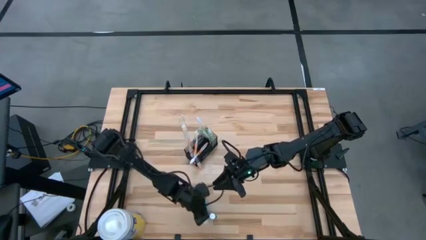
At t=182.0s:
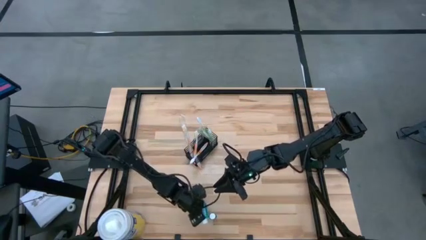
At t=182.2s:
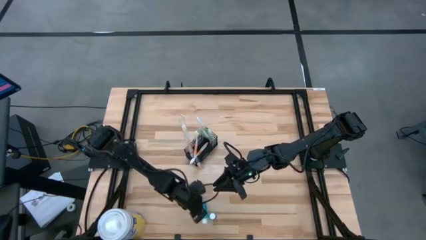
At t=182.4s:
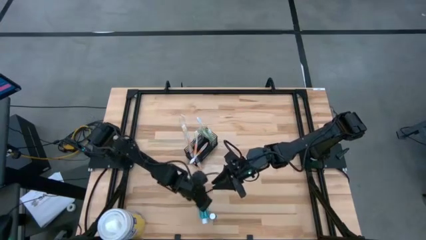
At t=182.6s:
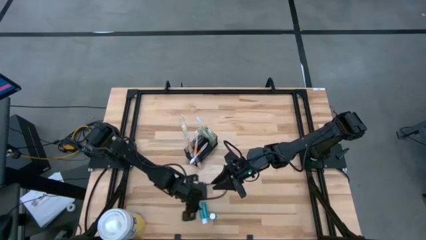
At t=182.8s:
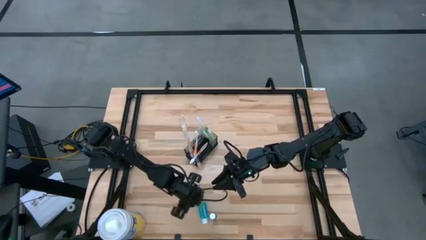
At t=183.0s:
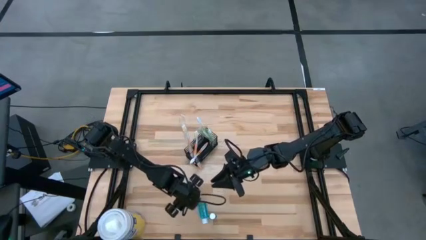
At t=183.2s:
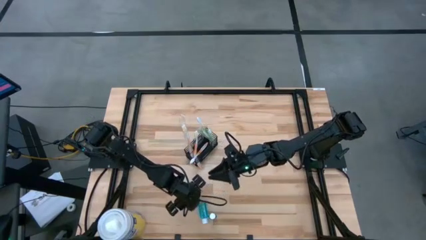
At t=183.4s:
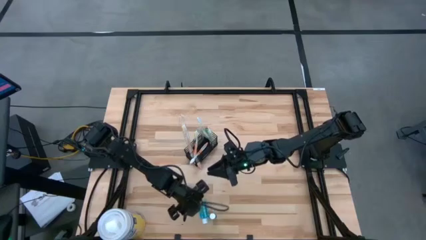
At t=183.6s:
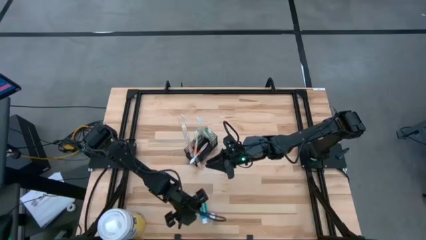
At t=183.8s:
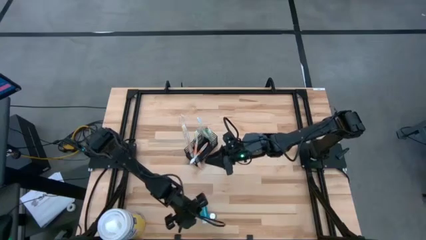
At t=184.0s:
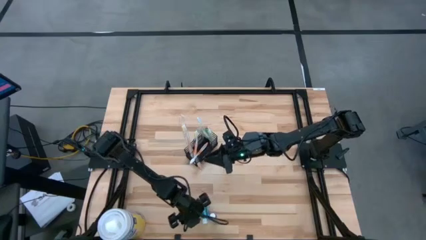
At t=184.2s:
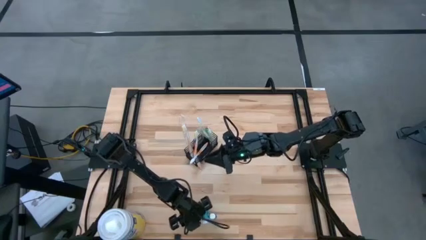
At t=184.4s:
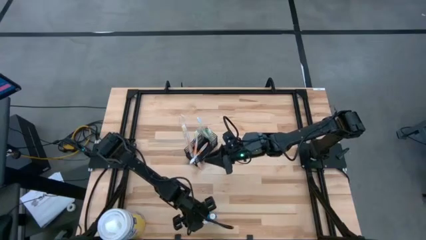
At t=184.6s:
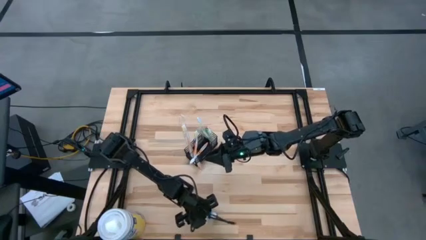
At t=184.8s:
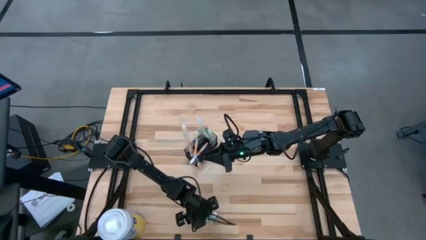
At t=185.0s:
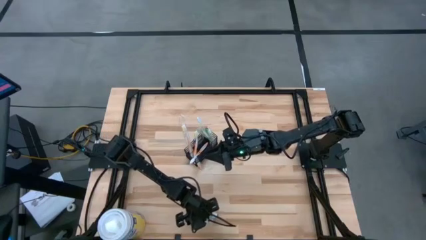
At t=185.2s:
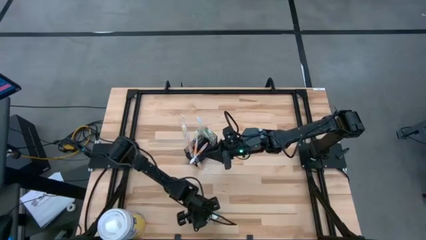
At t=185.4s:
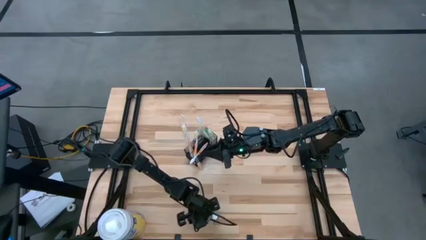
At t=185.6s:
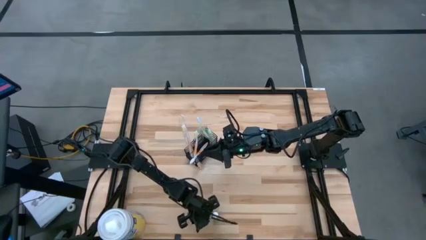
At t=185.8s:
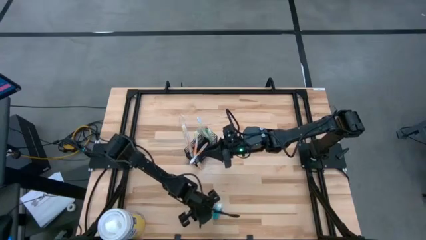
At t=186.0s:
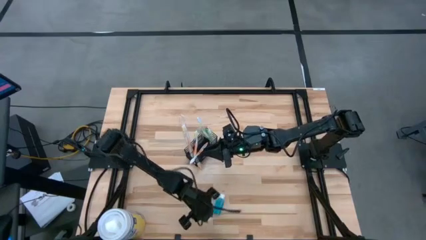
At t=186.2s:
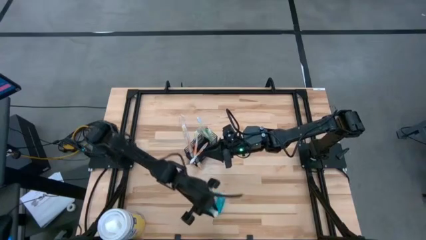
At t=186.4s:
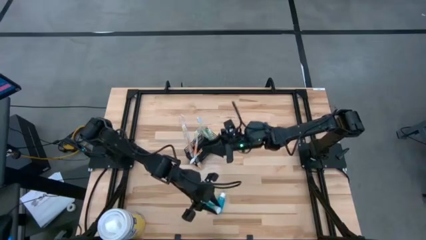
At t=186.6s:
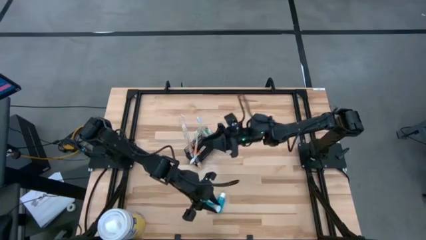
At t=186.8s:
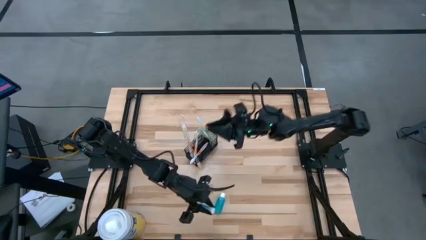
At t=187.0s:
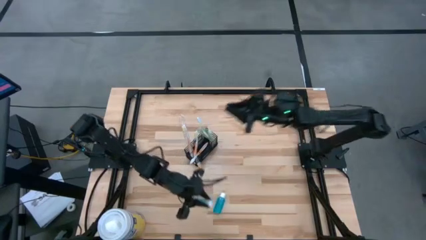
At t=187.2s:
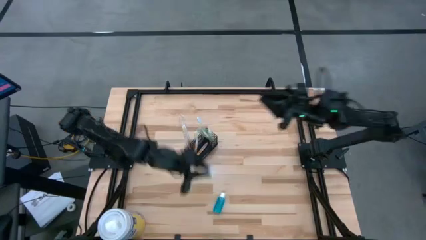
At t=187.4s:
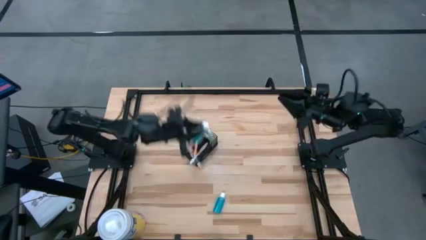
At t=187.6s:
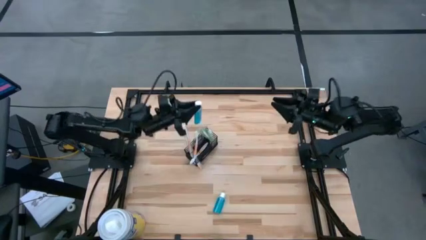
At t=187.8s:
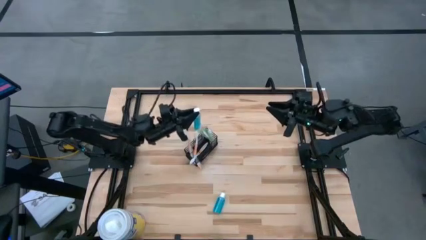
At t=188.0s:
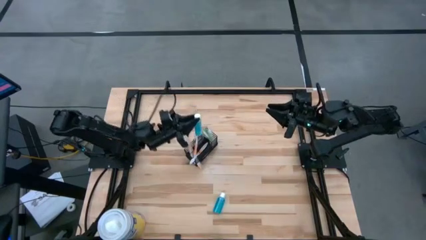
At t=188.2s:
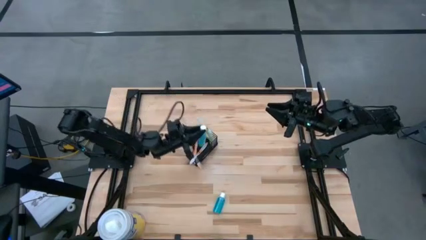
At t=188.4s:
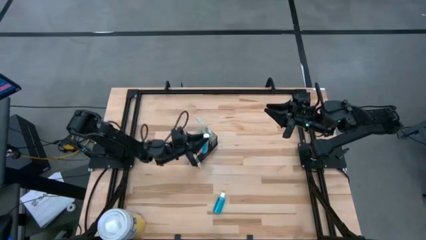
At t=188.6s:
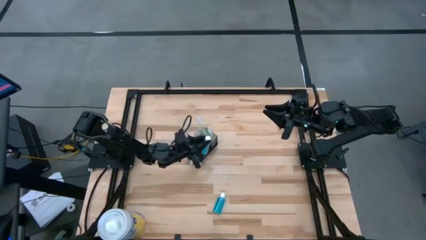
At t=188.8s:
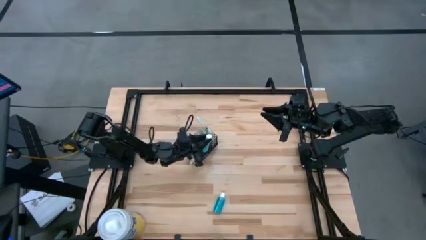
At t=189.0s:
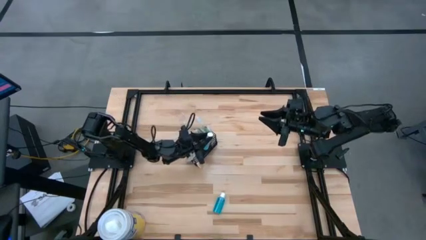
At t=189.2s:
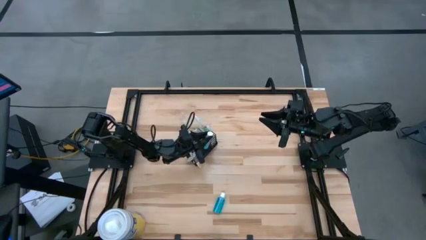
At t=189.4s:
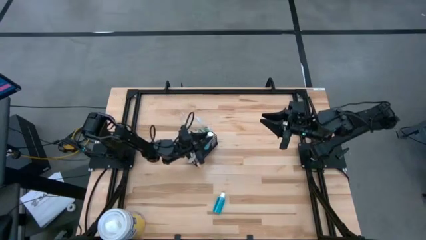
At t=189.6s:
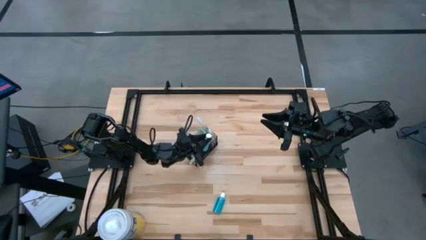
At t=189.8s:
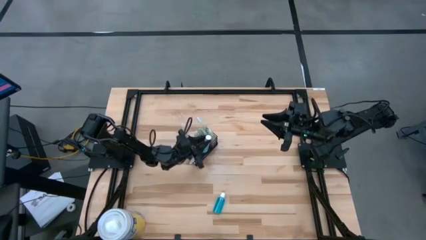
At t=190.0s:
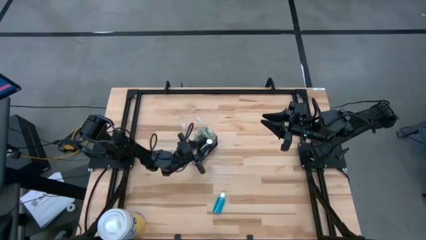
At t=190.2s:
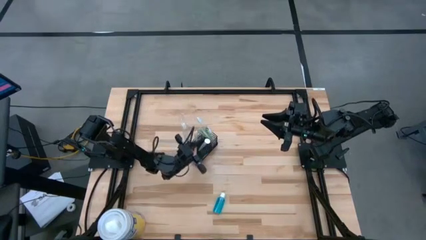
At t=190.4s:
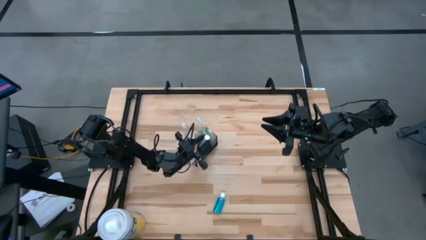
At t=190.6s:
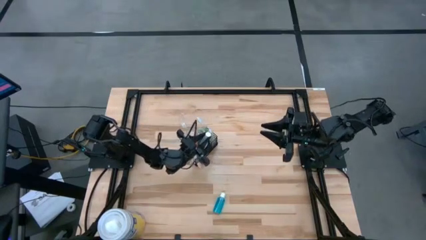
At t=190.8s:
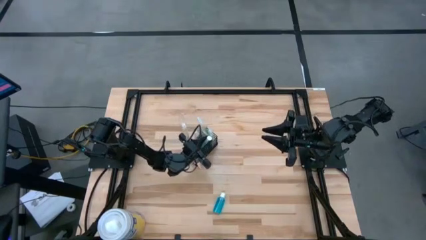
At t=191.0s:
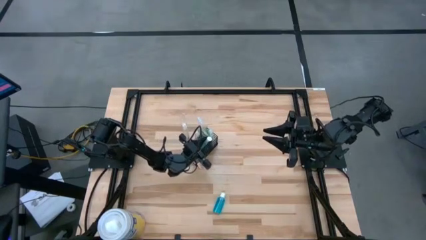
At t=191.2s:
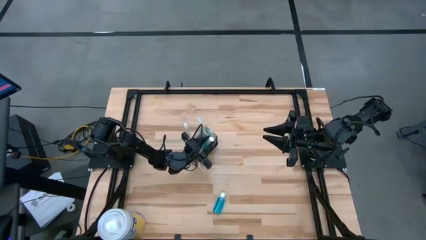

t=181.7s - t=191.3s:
Task: Pick & Place toothbrushing station
Put the left blue mouthwash into the wire organizer

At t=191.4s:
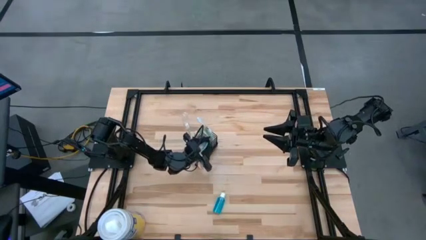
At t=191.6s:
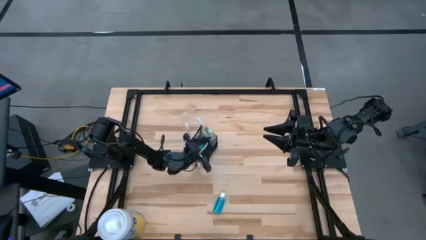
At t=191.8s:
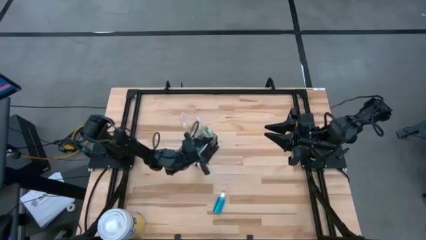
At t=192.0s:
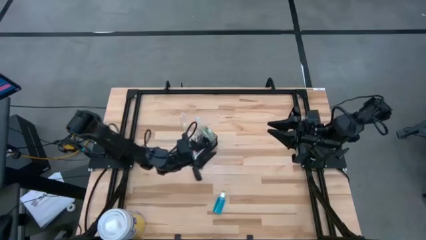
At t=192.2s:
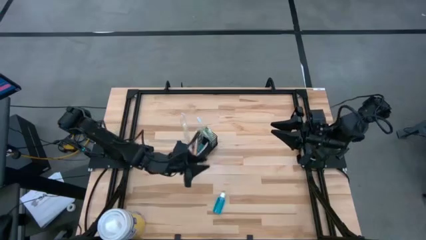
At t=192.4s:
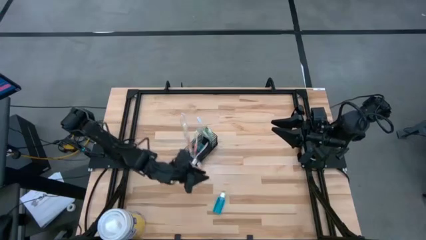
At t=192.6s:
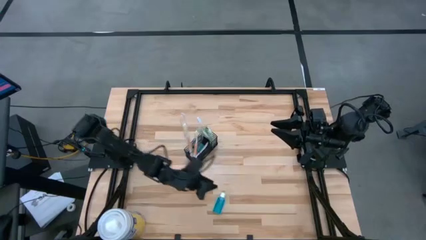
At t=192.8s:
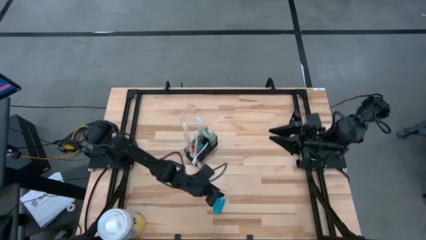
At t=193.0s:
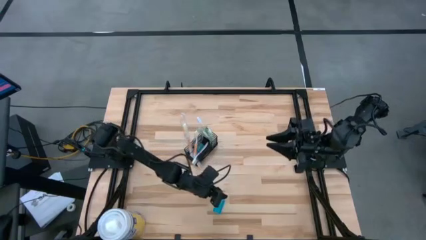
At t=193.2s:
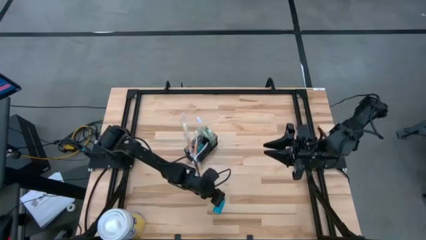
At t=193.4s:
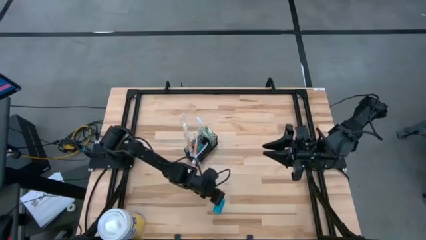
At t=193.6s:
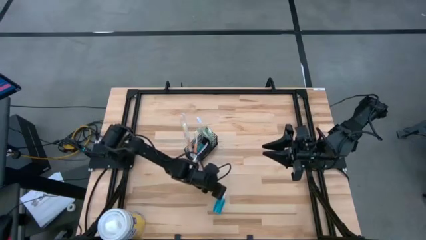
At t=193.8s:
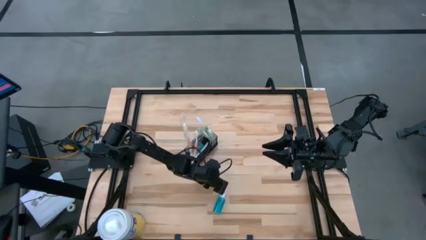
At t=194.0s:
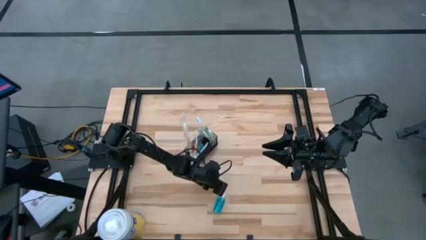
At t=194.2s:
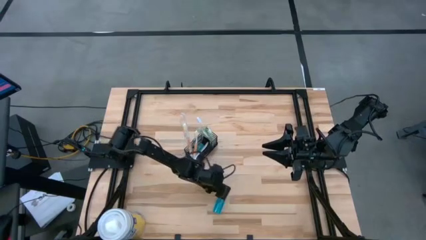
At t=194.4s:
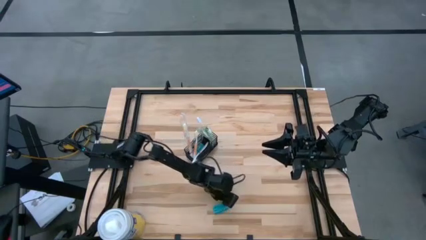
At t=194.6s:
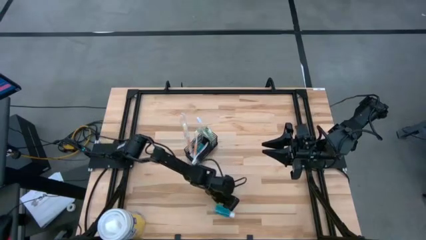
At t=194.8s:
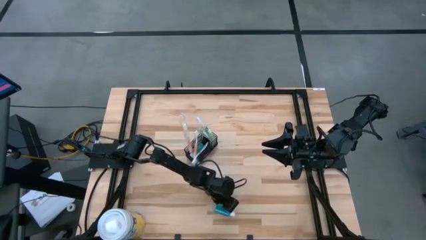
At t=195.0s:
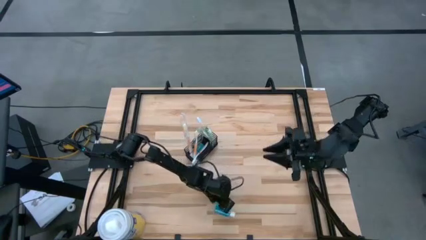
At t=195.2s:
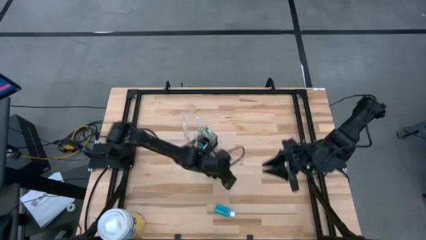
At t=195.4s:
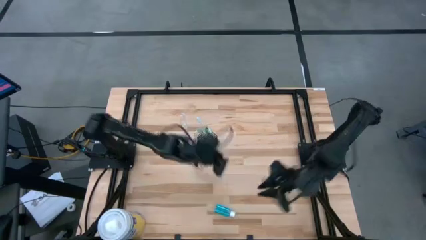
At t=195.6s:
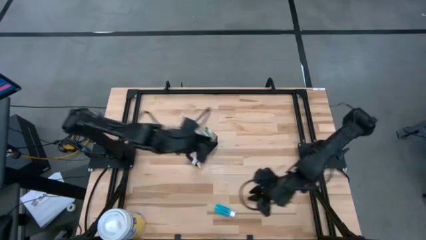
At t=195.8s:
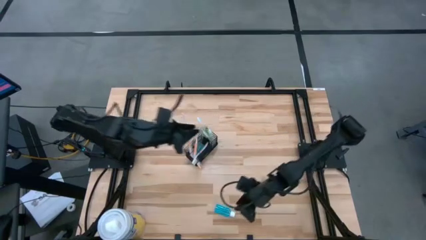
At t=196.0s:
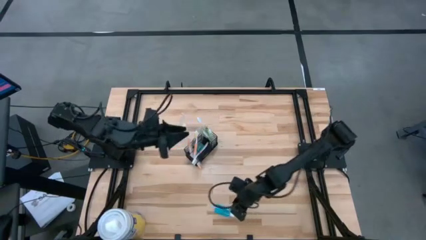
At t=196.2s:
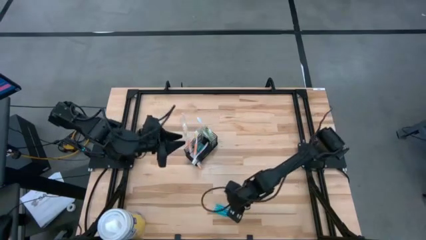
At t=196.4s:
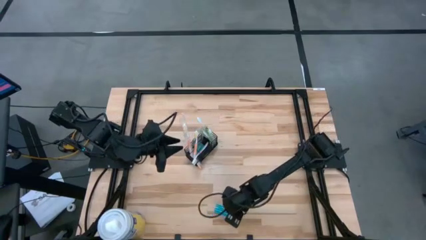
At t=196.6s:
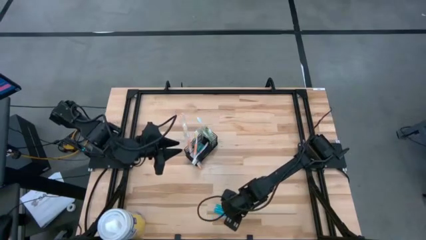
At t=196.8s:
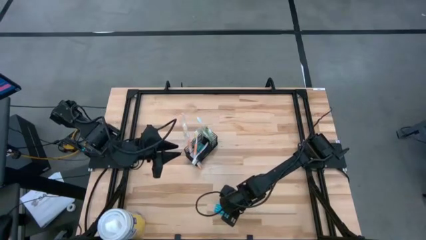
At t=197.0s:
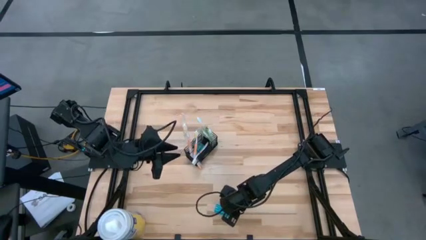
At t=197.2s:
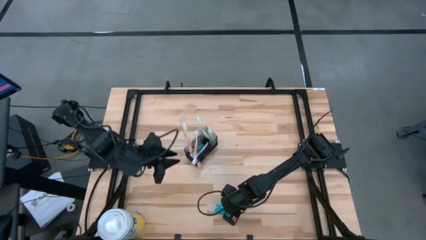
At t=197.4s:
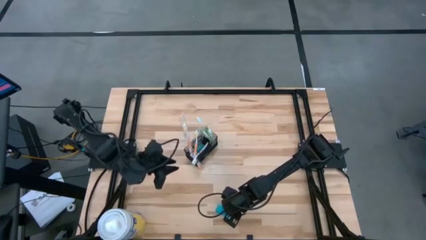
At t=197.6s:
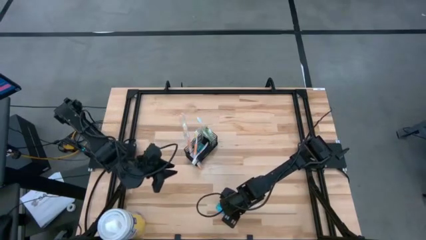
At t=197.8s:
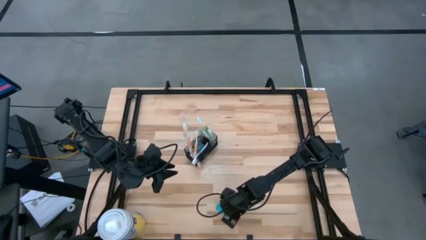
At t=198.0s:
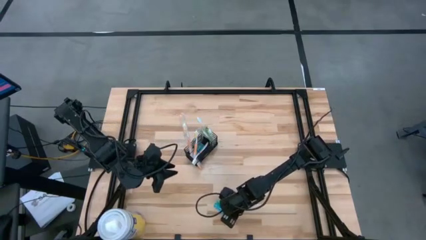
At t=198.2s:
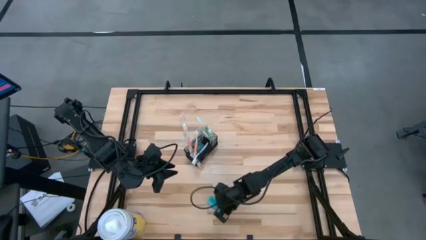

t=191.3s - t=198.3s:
Put the blue mouthwash into the wire organizer
